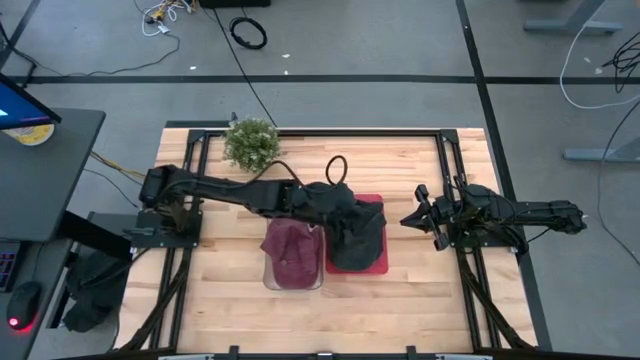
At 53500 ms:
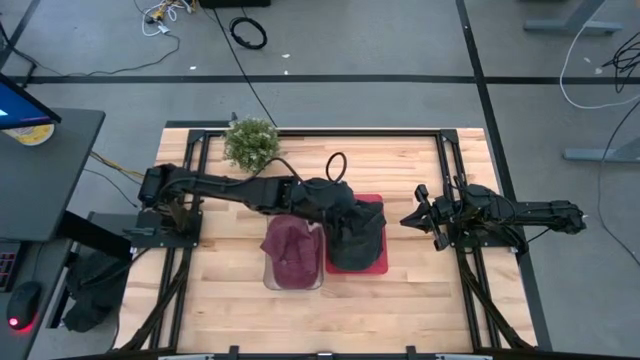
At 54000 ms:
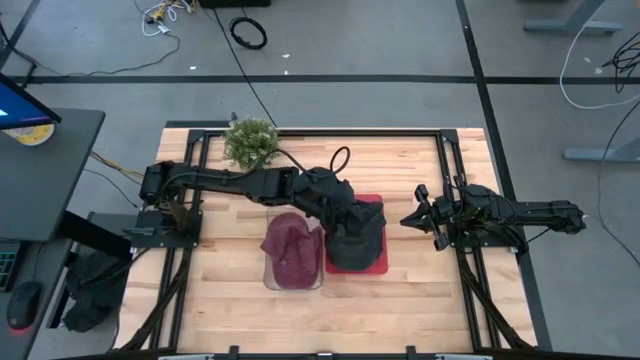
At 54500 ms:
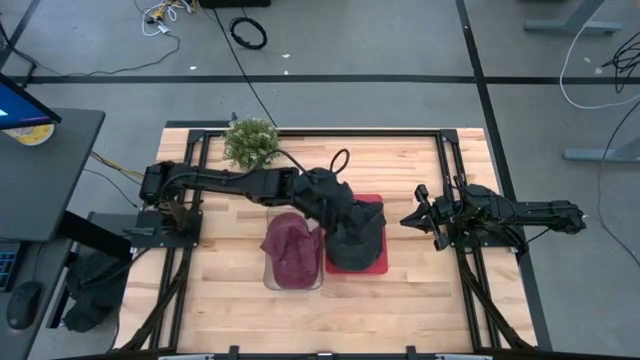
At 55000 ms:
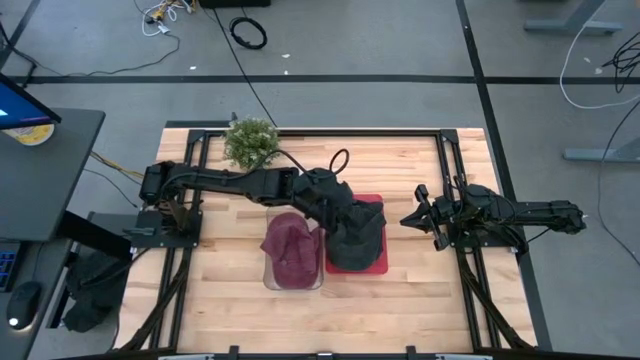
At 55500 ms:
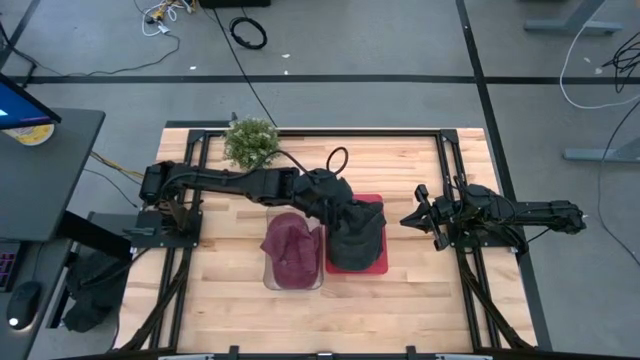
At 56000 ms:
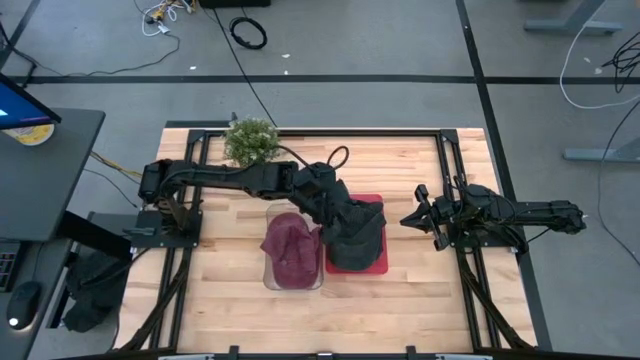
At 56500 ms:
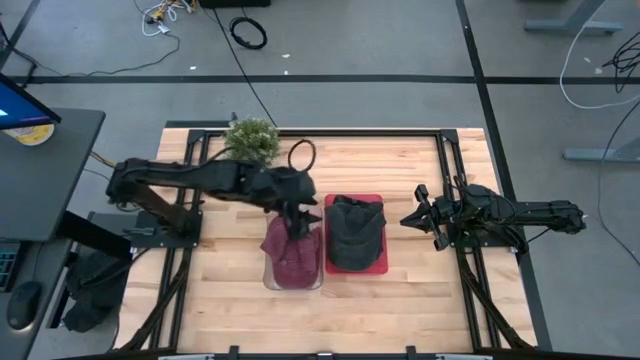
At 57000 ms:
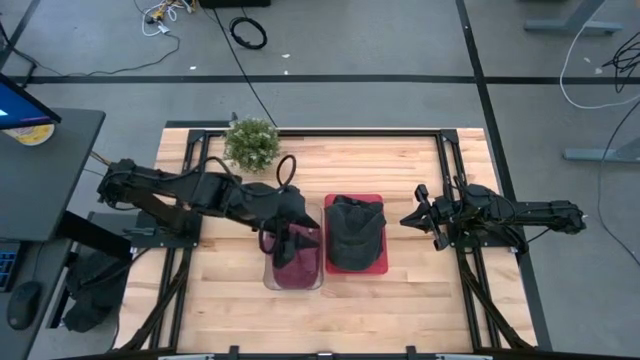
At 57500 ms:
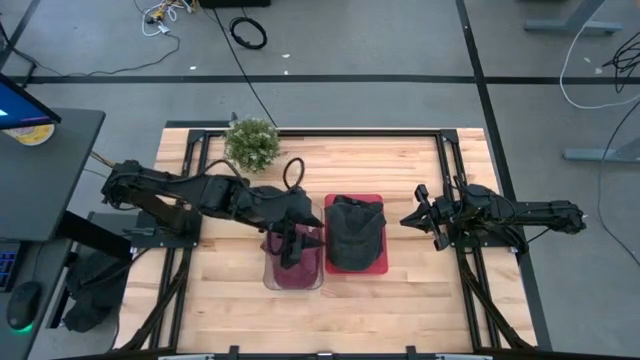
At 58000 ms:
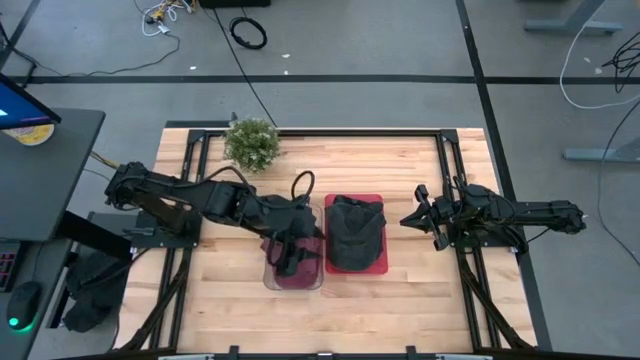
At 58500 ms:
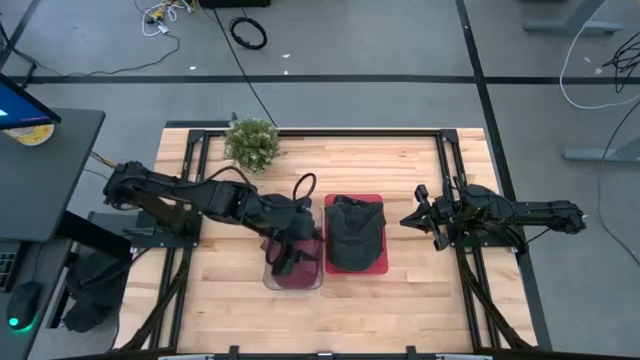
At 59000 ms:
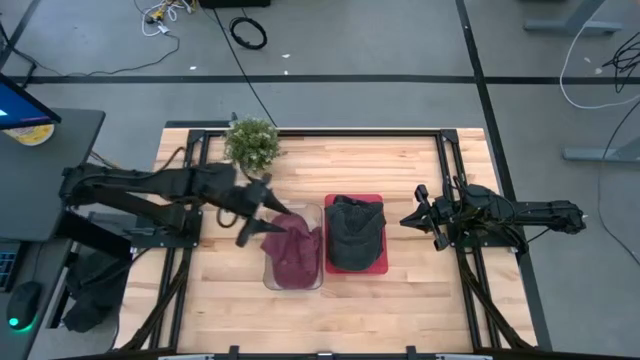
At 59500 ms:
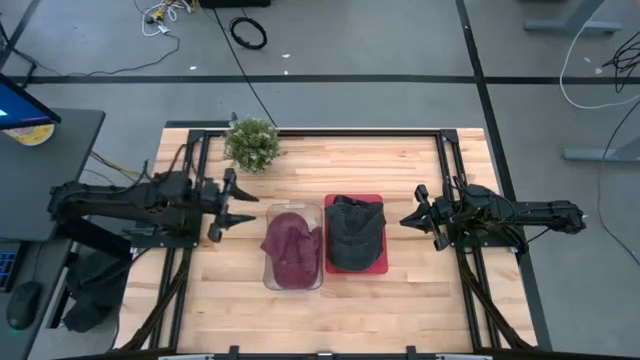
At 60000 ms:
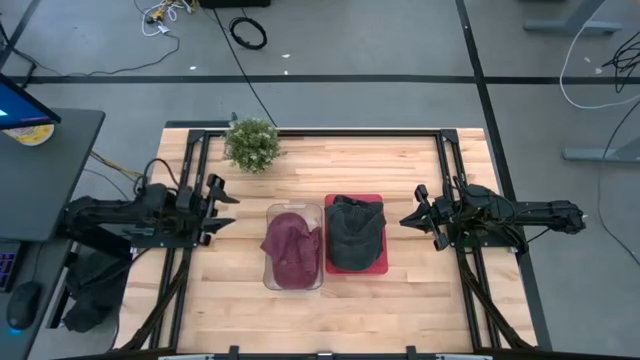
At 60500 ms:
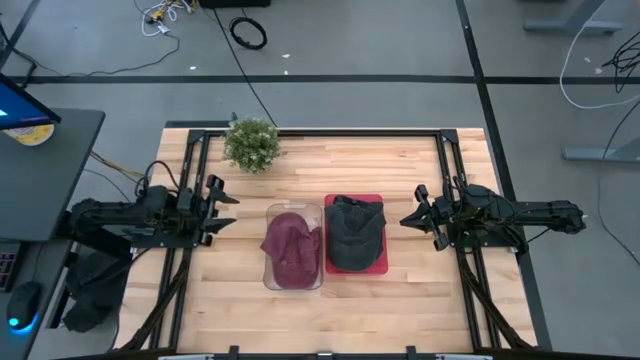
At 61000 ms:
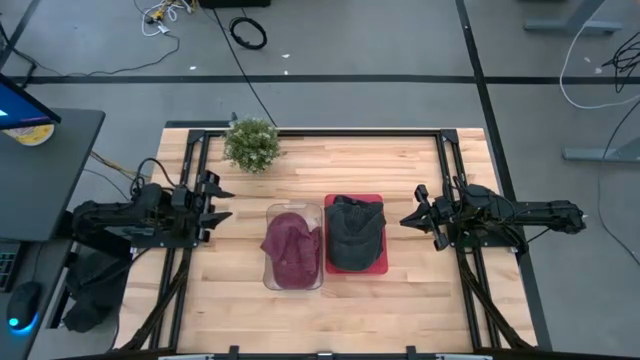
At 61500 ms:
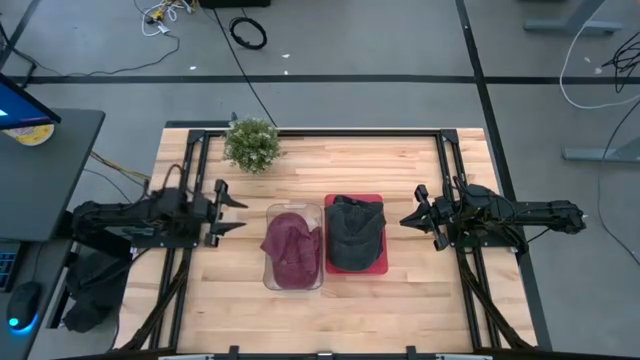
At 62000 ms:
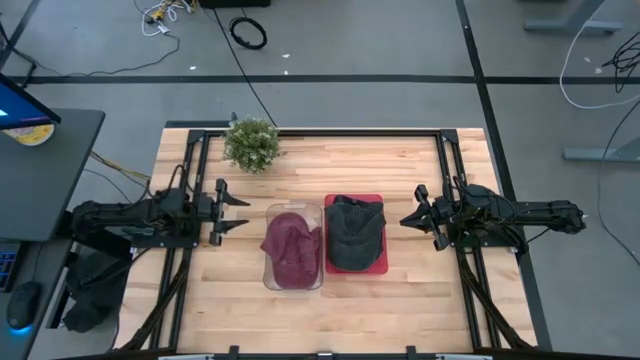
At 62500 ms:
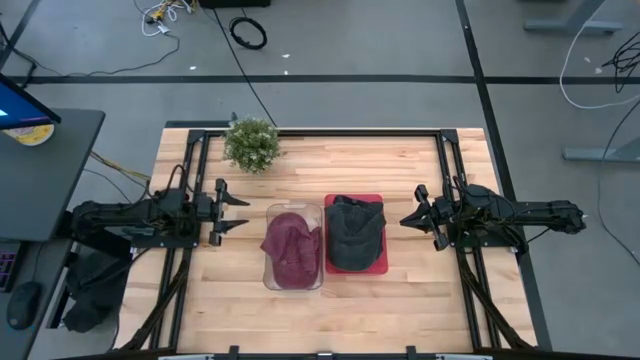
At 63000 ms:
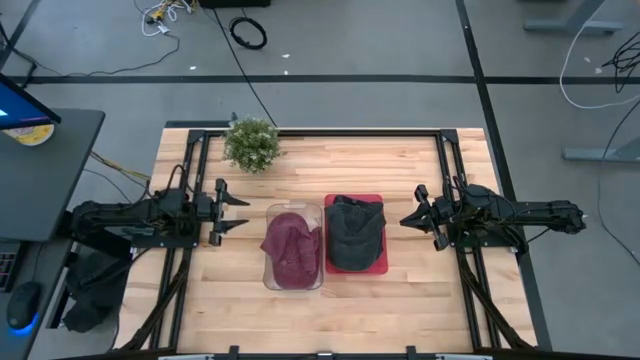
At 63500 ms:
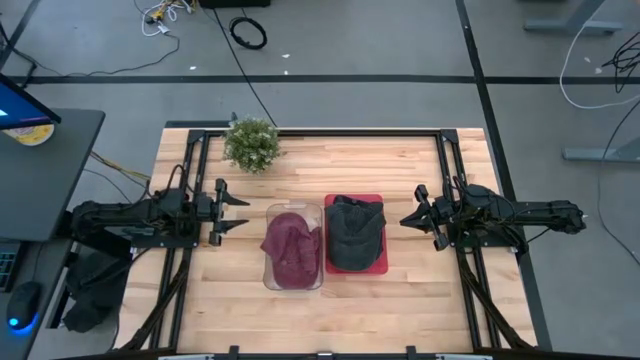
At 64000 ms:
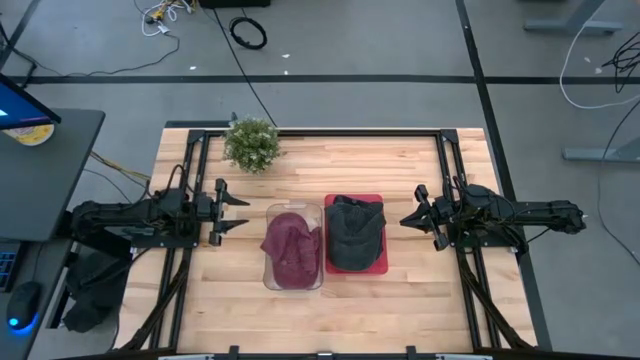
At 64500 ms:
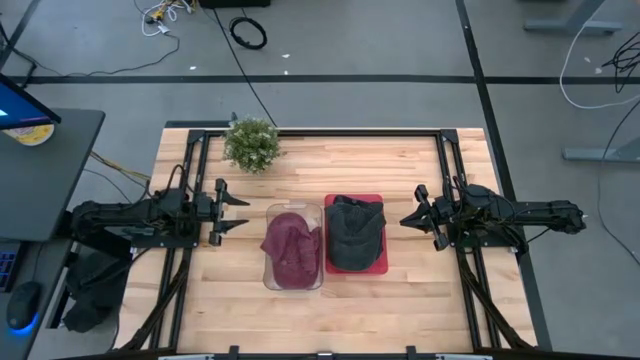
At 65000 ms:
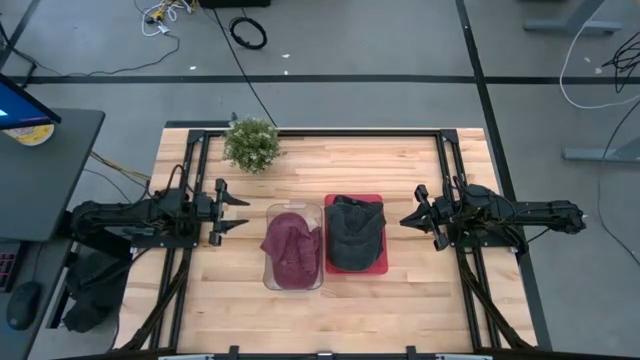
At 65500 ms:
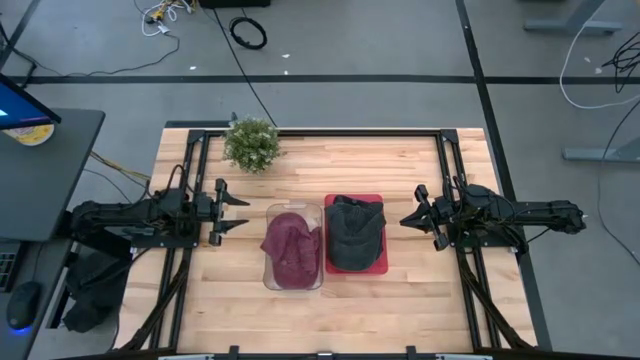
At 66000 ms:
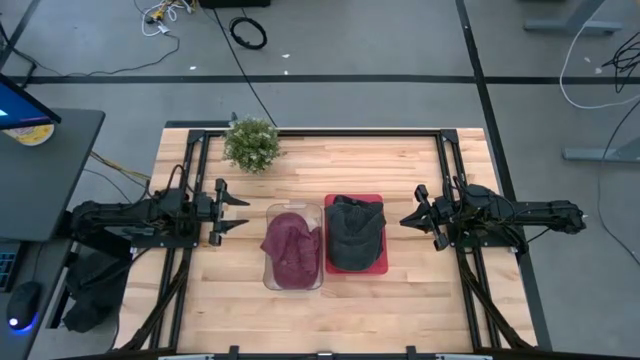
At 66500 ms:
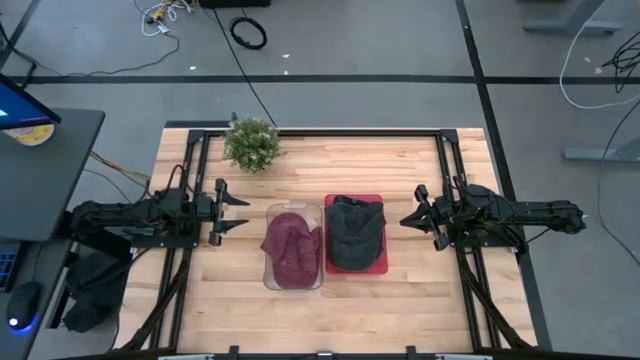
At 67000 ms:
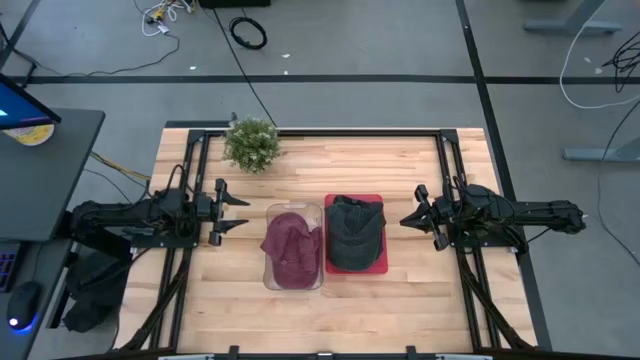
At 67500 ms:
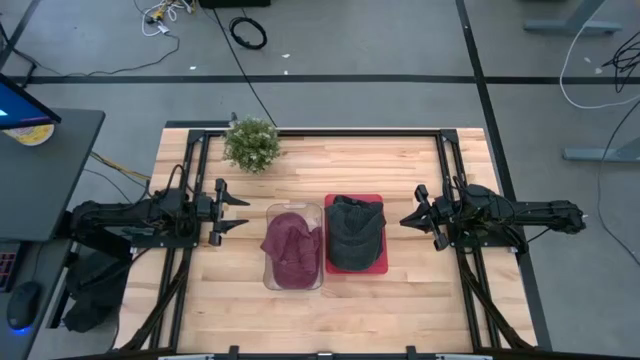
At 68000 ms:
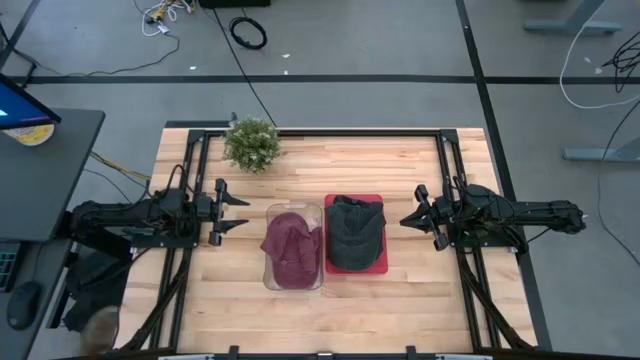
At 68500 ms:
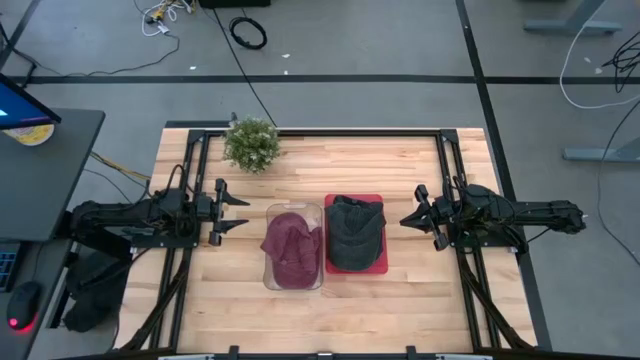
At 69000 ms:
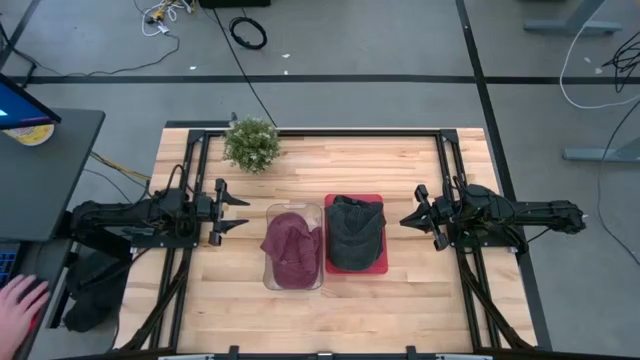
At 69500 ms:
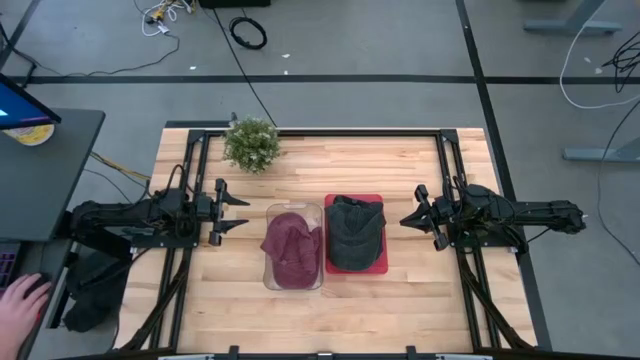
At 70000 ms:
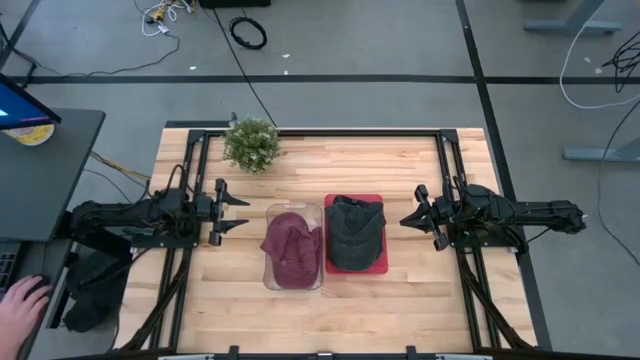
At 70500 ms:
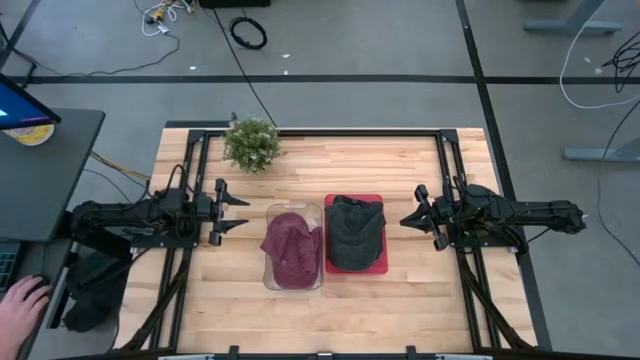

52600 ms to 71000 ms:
Task: Pick & Place hat
Return to Home Position

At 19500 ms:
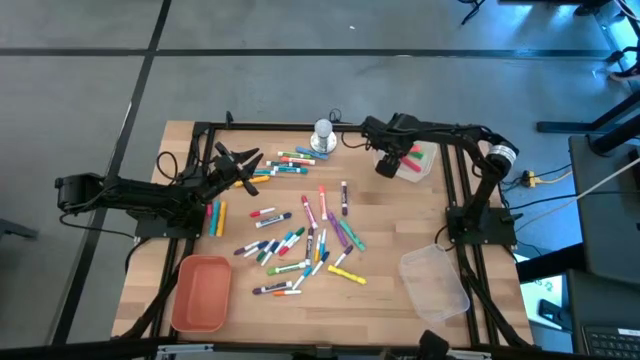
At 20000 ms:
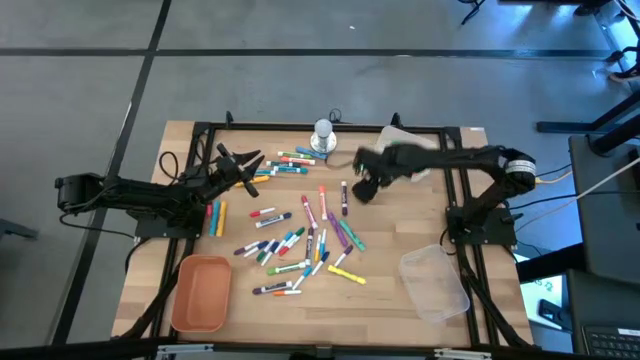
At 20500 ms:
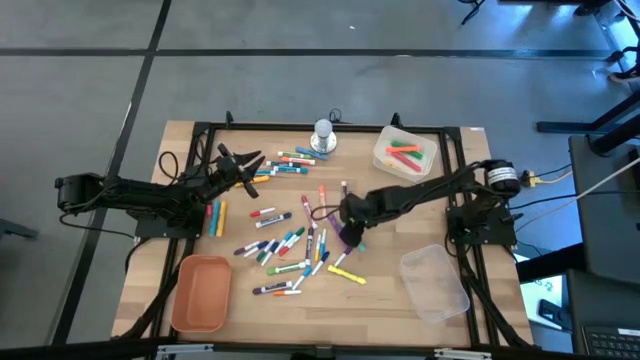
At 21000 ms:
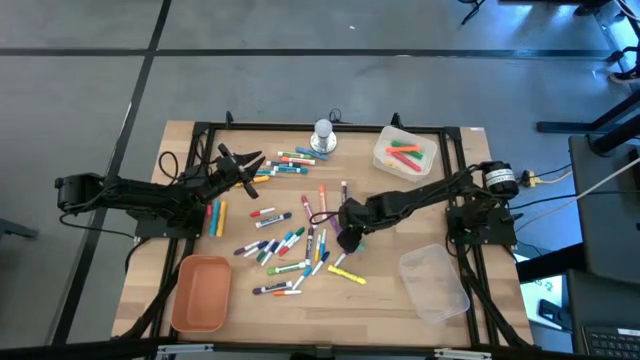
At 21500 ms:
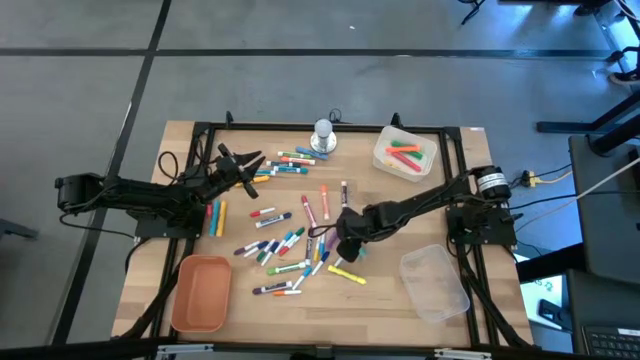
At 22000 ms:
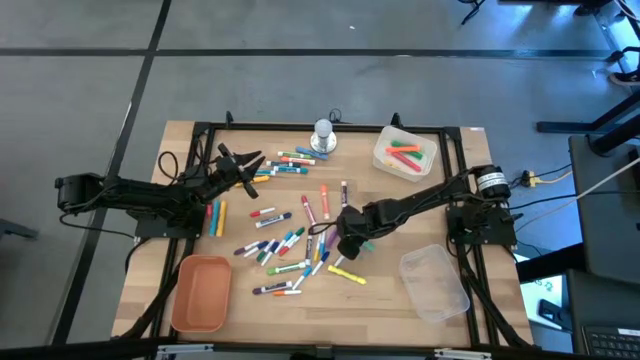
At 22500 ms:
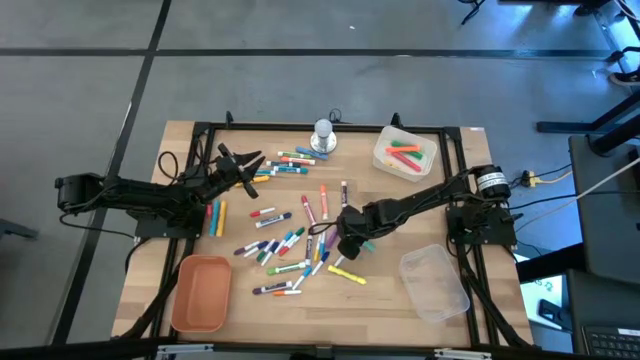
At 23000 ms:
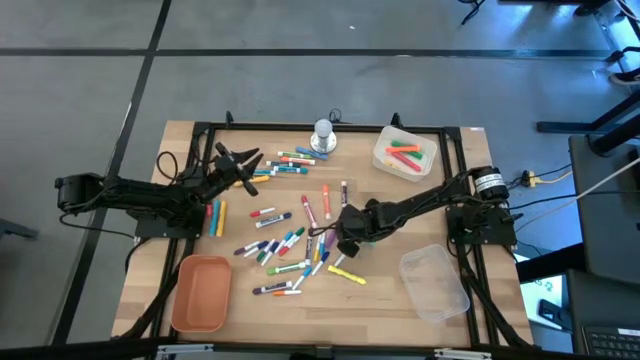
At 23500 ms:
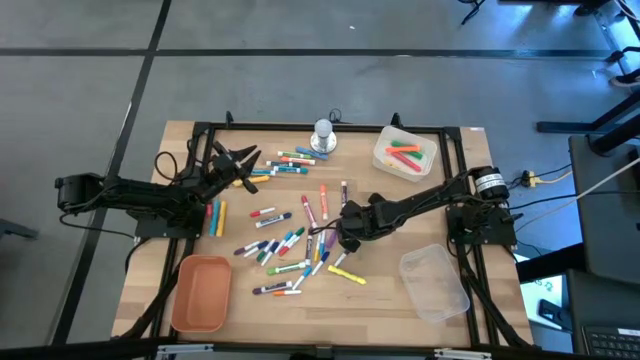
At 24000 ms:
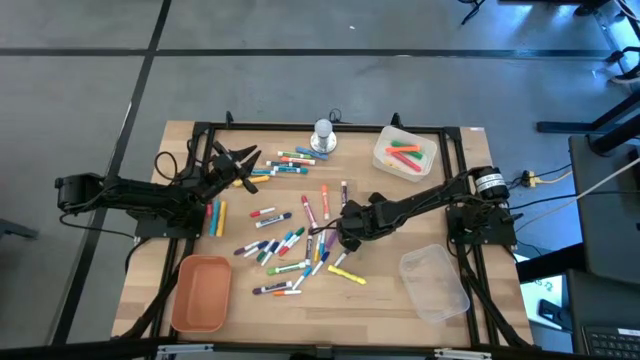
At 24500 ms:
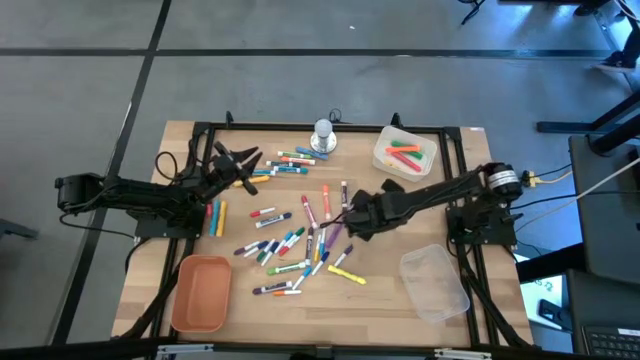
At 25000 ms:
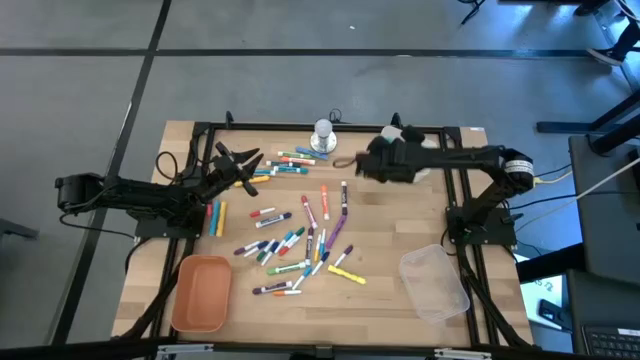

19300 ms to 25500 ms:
Task: Pick & Place Markers
Put the large blue highlighter pen into the white bin
